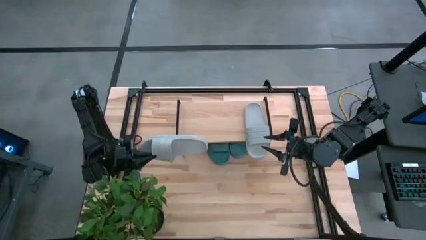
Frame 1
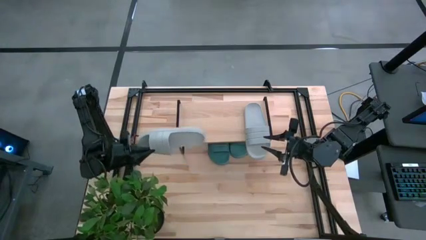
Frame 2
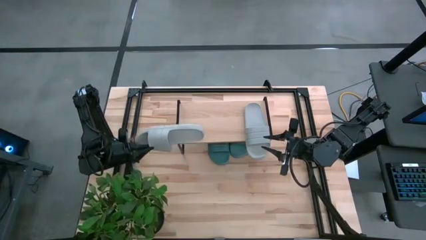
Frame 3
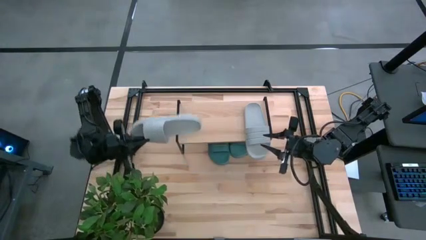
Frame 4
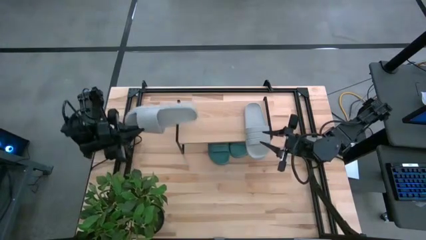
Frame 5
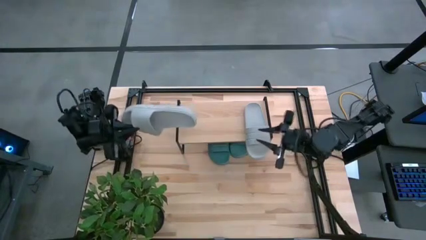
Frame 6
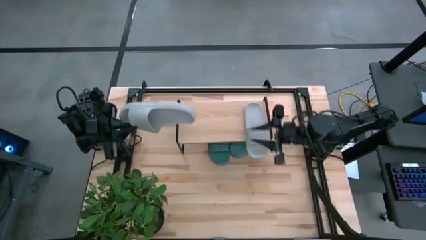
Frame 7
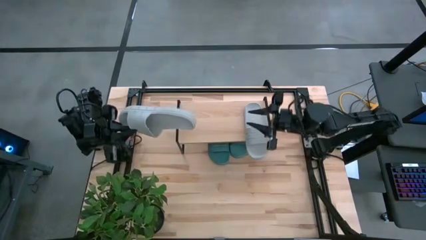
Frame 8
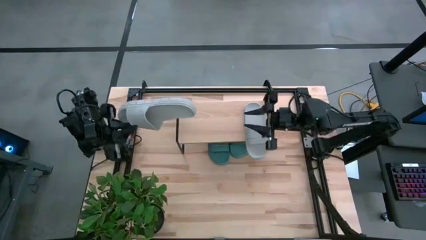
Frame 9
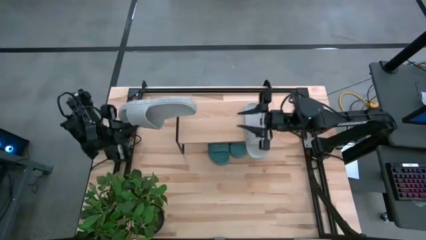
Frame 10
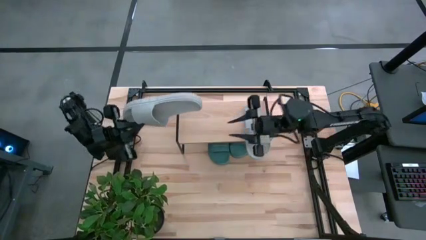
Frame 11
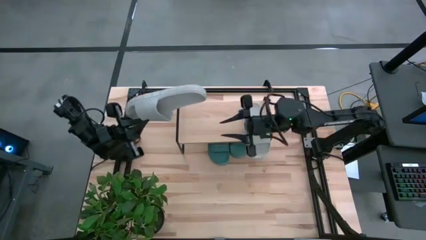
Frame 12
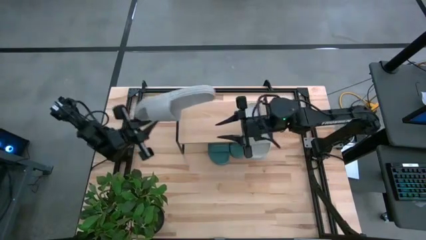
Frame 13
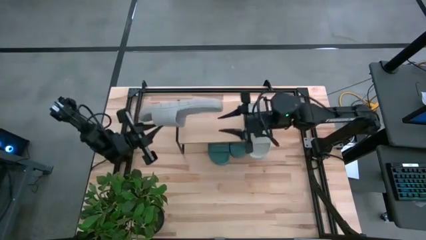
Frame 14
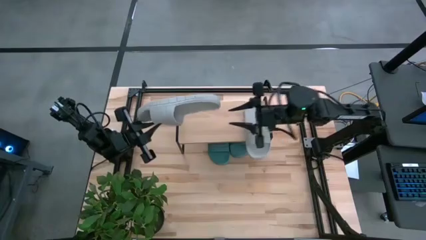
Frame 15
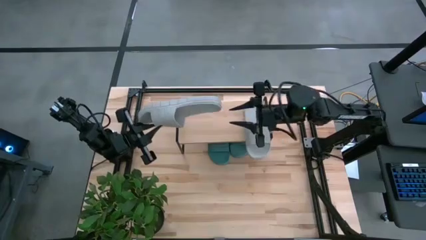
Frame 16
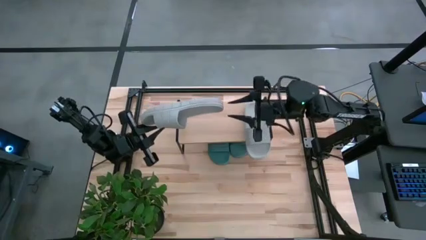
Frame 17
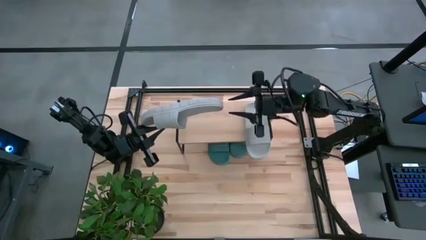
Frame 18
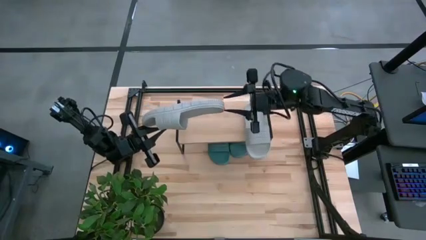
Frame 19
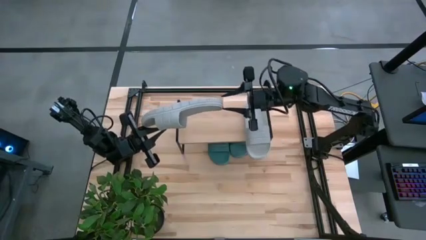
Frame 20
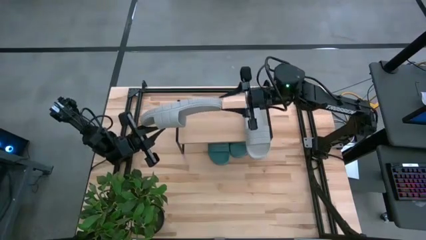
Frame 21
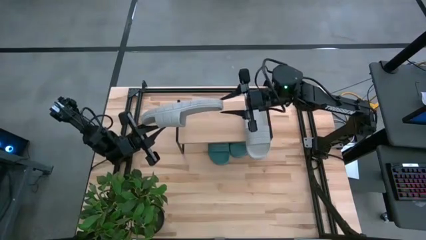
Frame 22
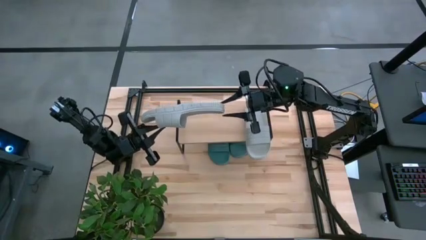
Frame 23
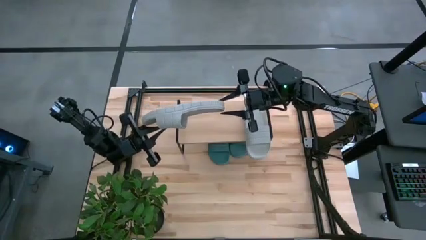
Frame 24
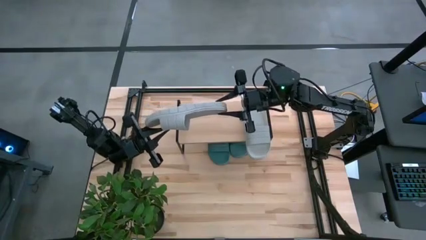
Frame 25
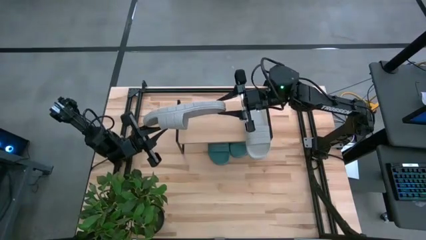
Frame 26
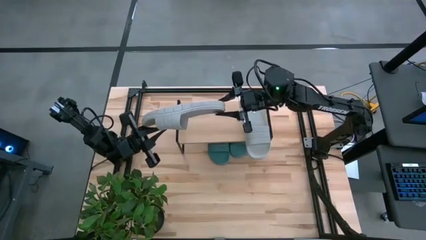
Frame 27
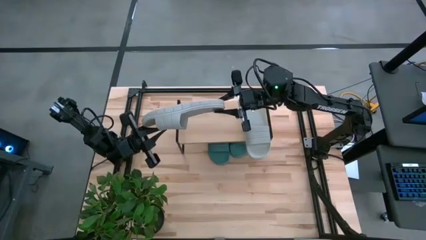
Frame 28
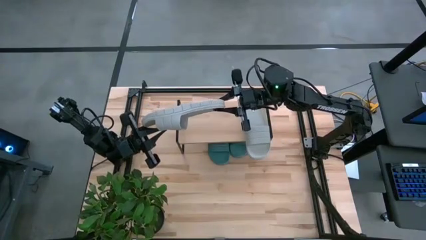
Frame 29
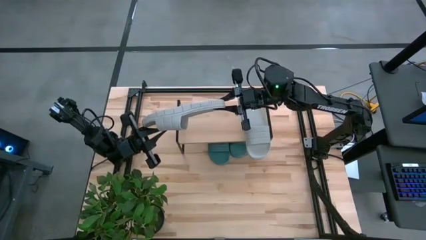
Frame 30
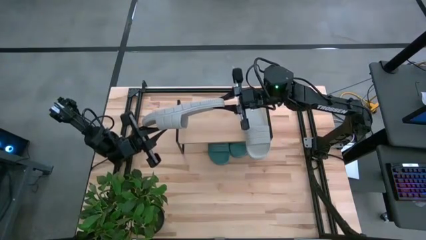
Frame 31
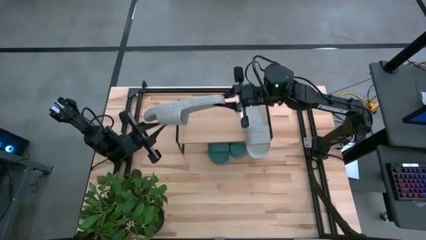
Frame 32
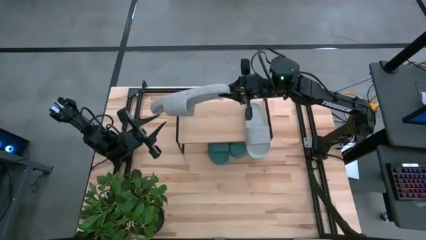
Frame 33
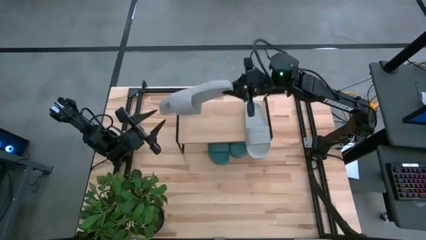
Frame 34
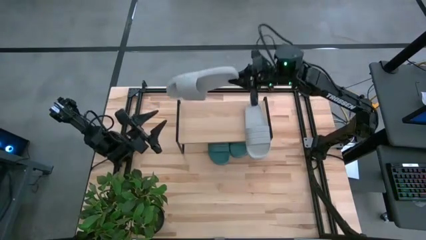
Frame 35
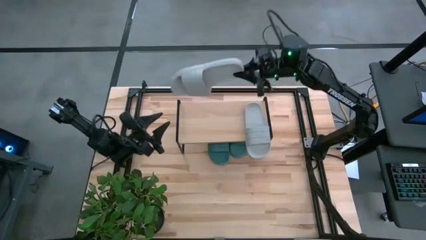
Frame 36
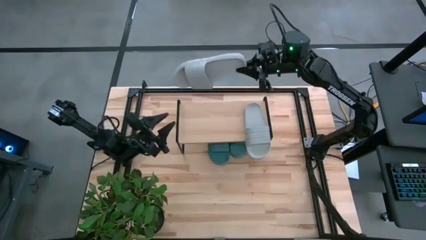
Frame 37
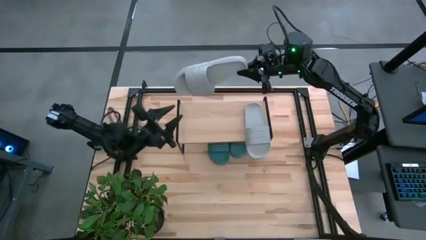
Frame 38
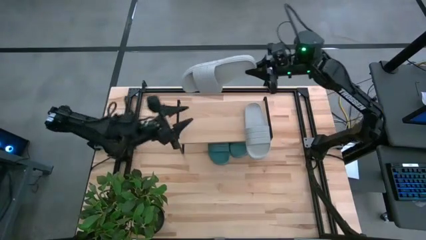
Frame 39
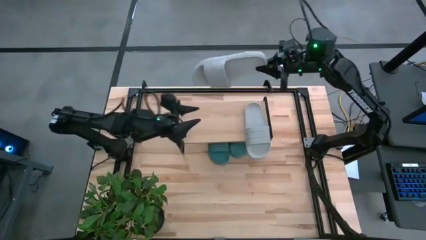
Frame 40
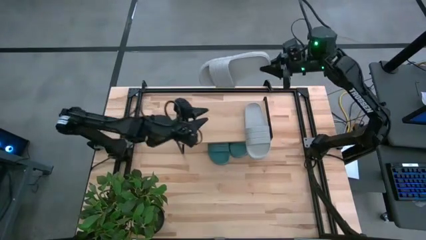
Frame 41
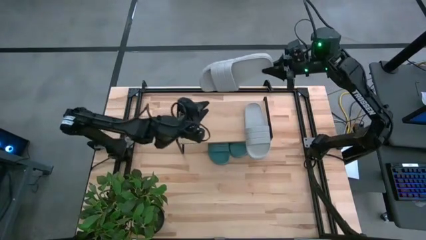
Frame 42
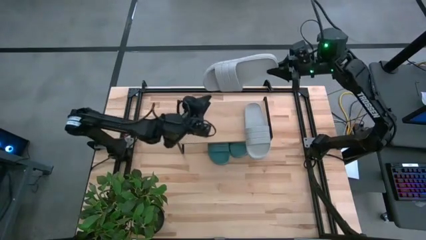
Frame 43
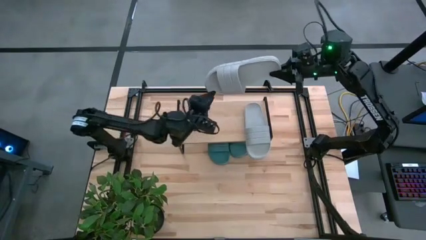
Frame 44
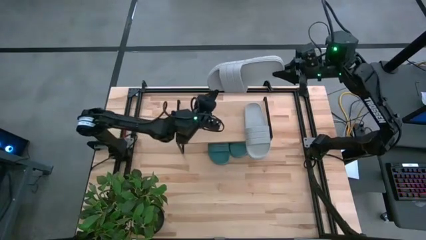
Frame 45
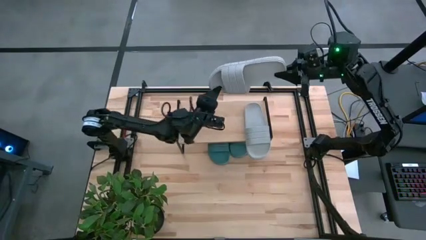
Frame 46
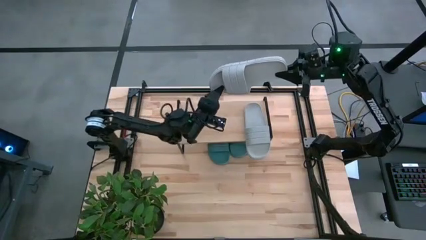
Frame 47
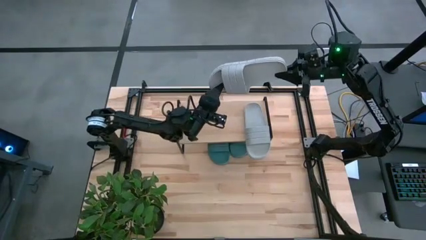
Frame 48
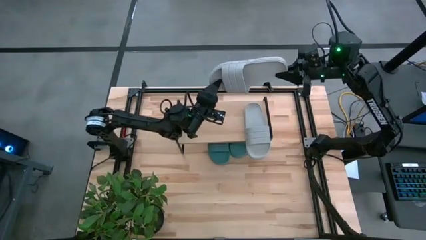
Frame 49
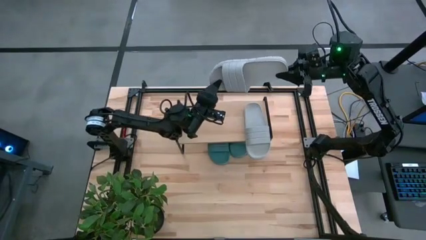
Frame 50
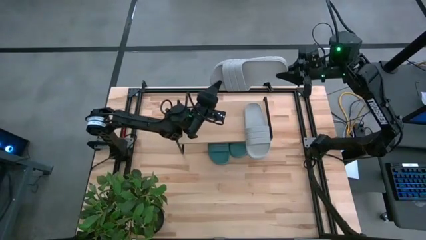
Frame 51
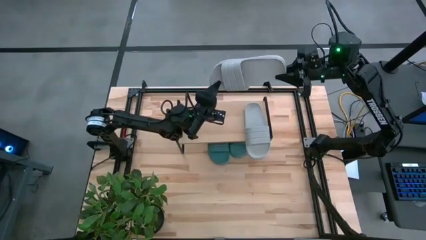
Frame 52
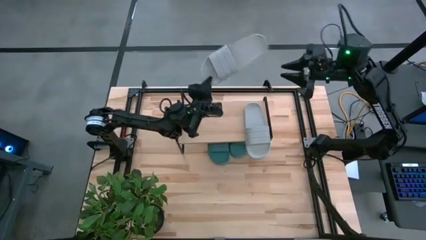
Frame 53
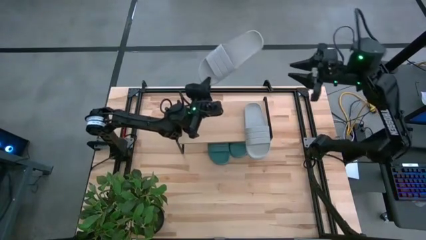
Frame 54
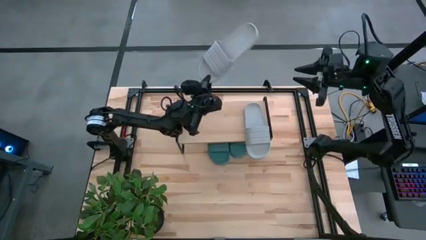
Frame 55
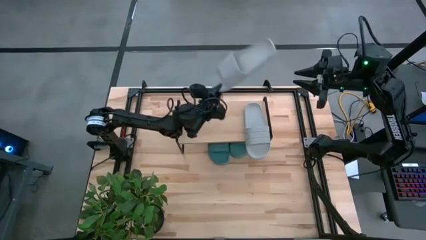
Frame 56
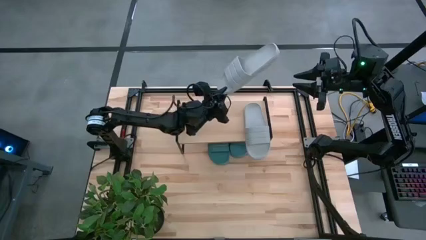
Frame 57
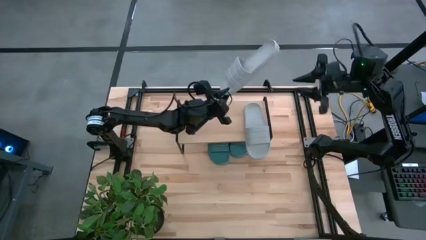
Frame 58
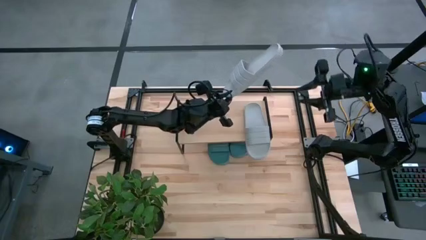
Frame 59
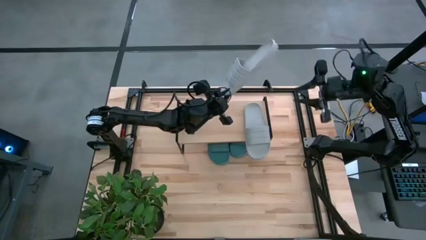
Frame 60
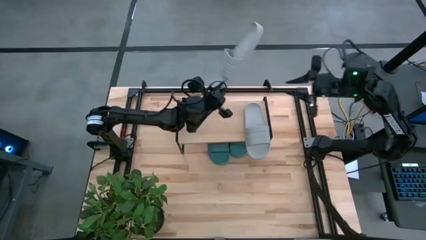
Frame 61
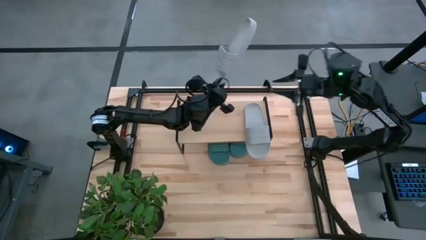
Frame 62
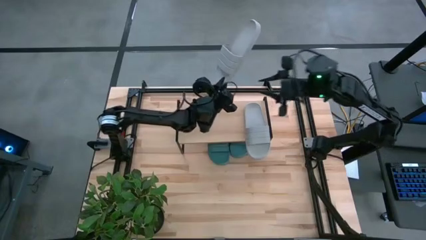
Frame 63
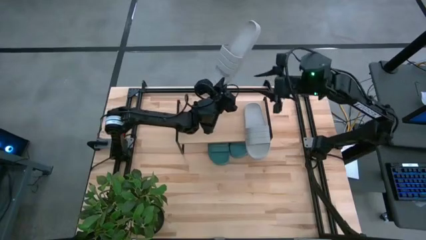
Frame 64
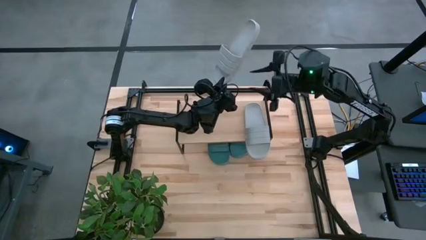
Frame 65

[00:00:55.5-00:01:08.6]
Task: Pick and place slides into the shelf
Put the gray slides on the shelf

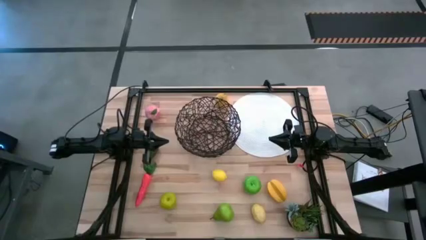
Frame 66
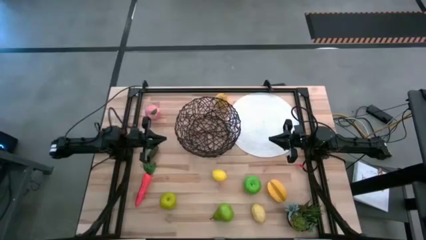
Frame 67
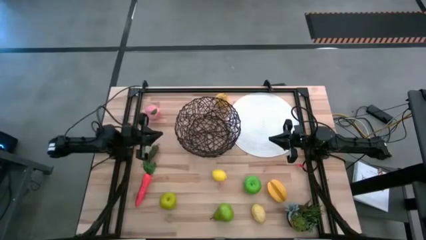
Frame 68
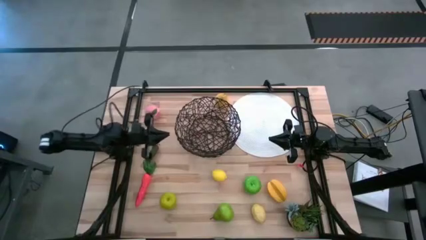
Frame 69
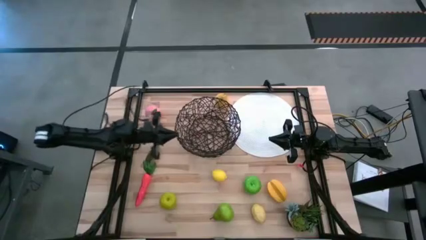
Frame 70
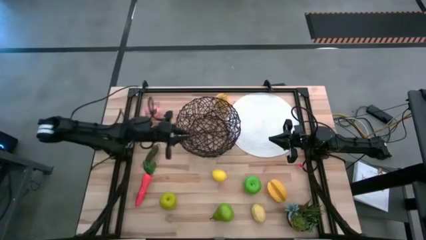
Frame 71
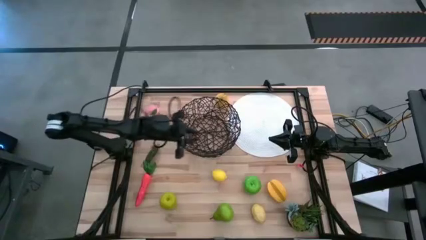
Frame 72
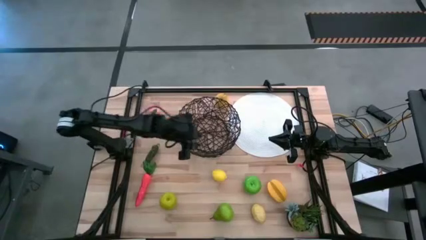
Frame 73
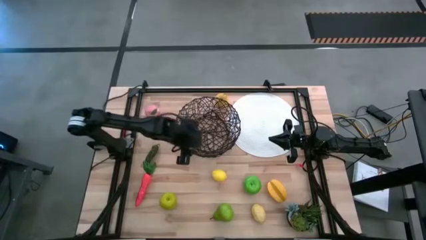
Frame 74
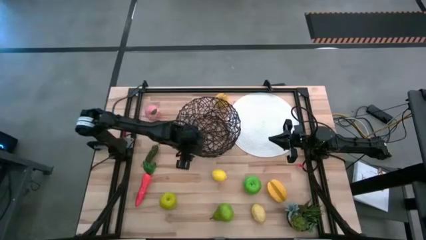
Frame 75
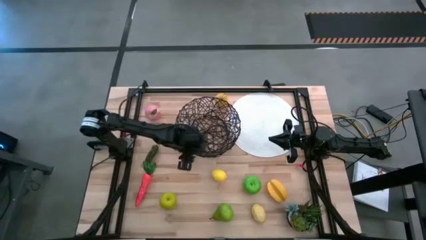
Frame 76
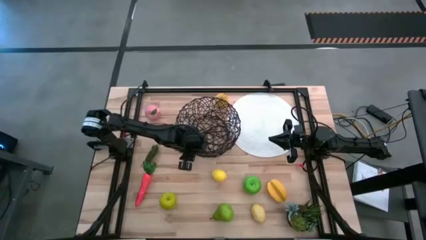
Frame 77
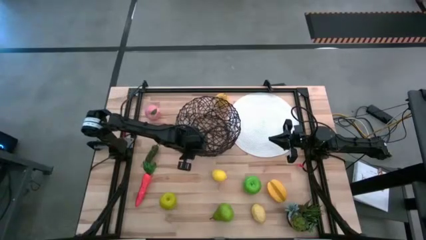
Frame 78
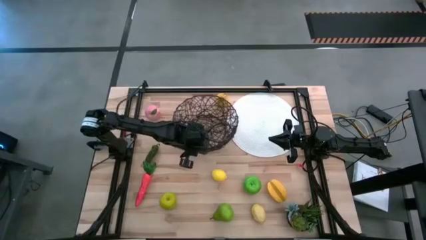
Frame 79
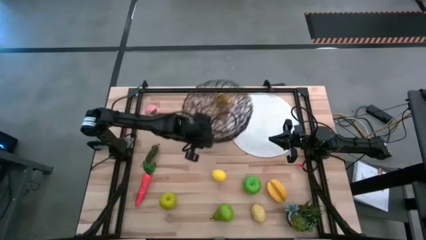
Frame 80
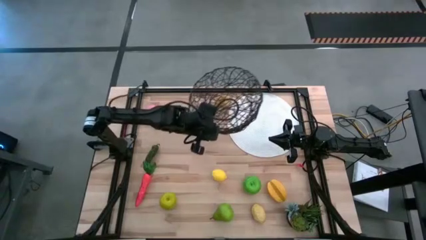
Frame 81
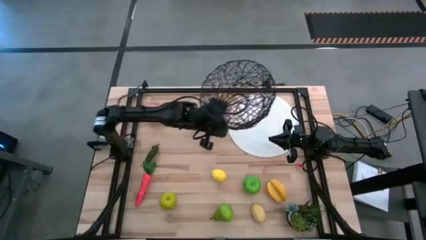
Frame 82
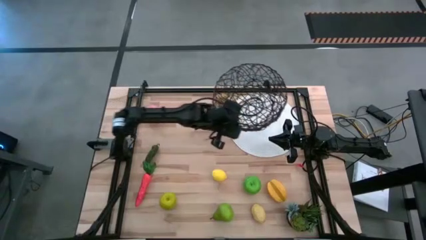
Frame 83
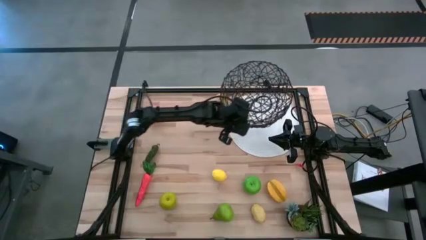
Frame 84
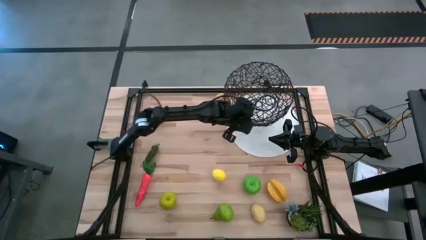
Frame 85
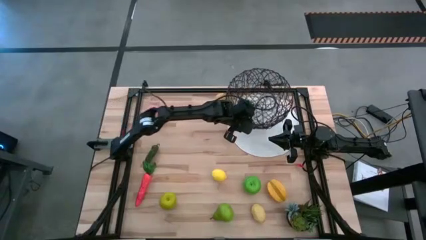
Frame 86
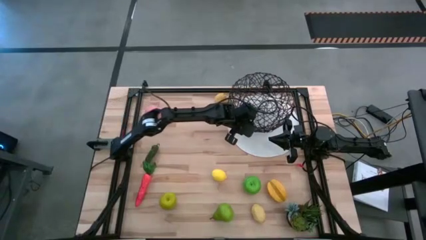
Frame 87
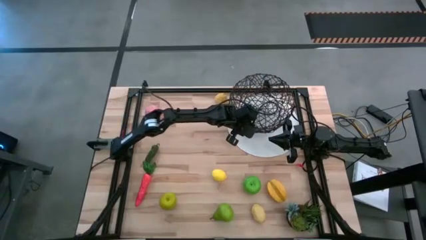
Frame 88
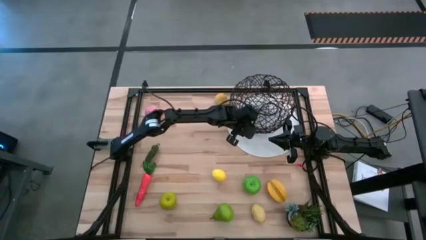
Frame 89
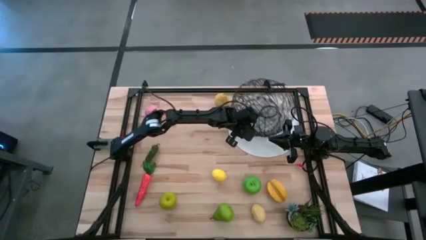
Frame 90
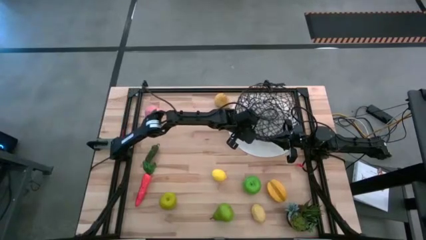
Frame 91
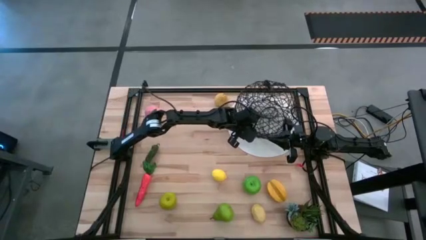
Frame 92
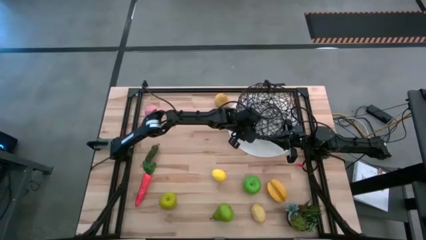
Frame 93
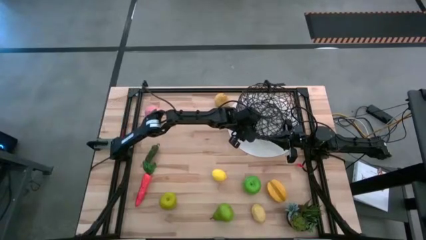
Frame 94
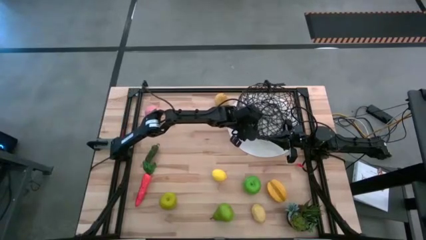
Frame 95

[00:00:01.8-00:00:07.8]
Task: Build produce basket
Prepare the black wire basket
